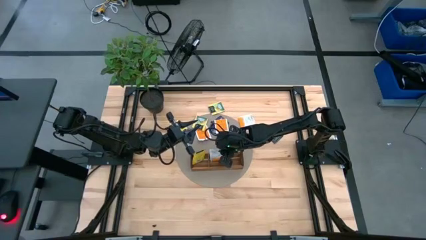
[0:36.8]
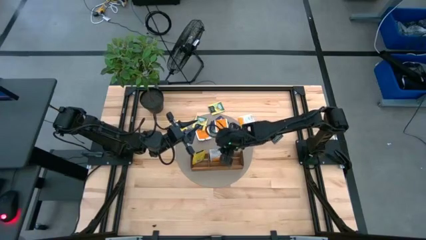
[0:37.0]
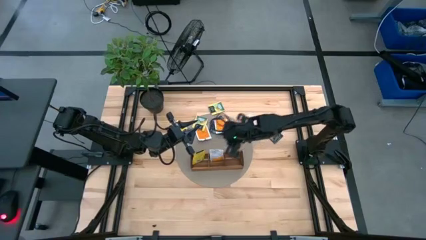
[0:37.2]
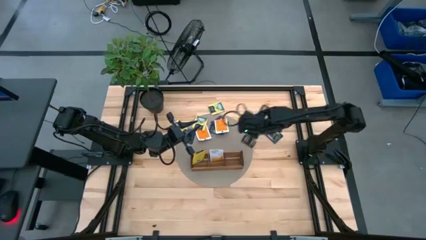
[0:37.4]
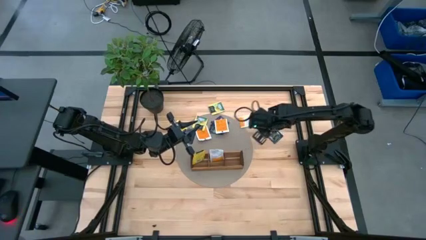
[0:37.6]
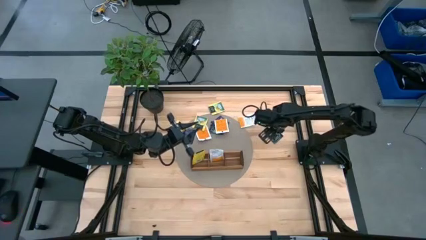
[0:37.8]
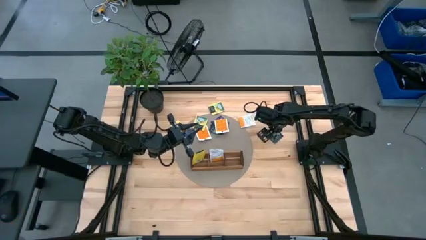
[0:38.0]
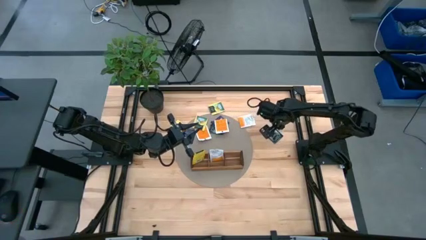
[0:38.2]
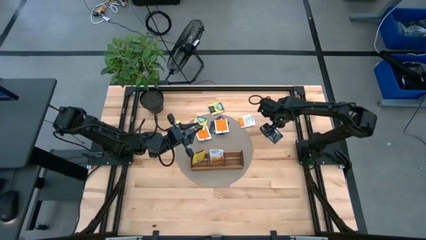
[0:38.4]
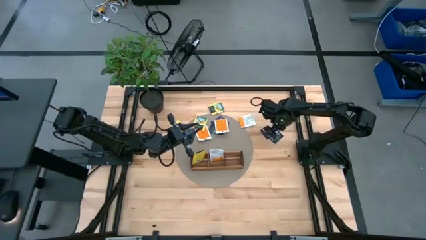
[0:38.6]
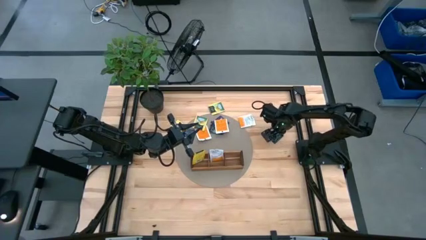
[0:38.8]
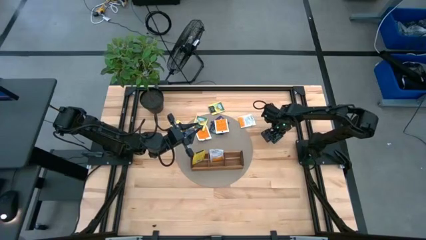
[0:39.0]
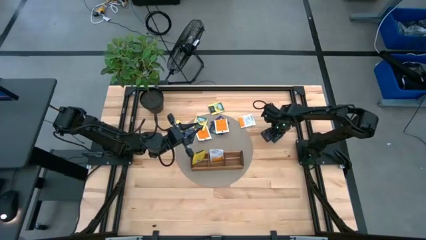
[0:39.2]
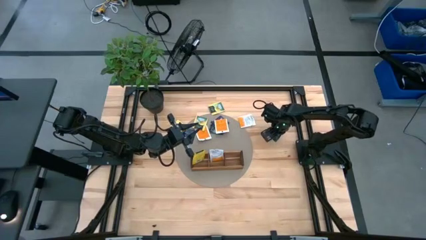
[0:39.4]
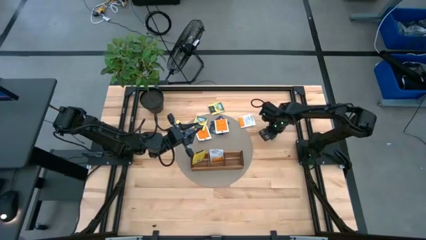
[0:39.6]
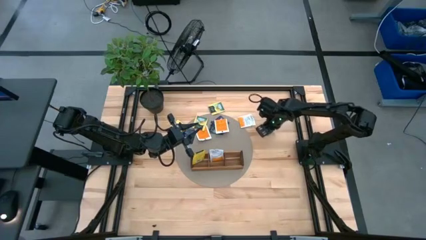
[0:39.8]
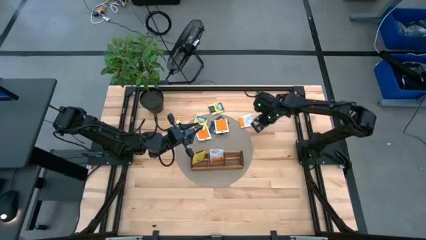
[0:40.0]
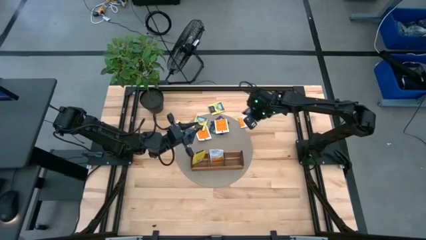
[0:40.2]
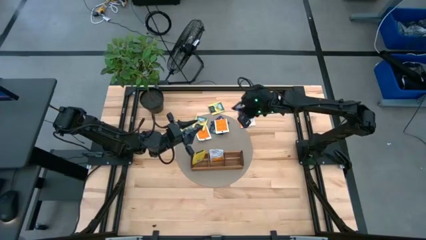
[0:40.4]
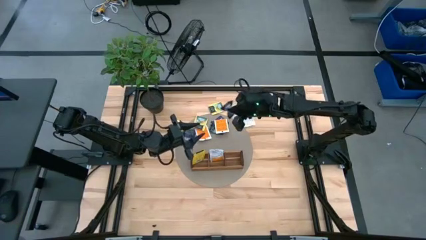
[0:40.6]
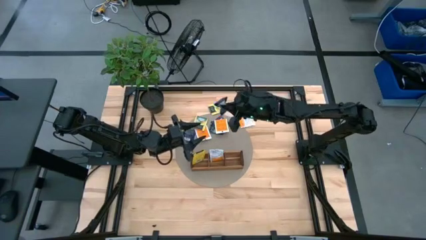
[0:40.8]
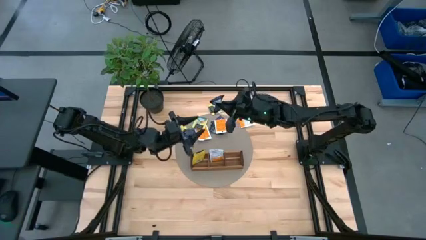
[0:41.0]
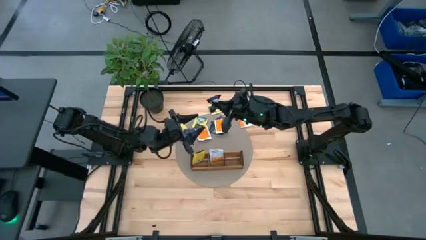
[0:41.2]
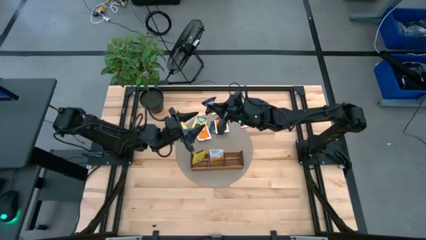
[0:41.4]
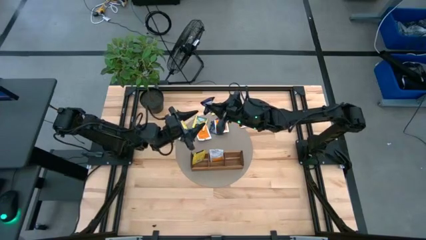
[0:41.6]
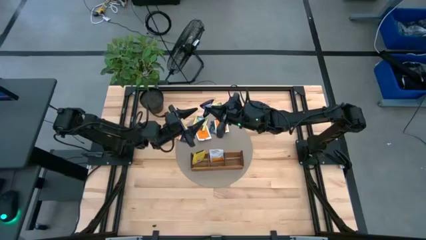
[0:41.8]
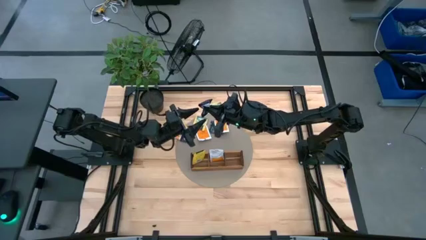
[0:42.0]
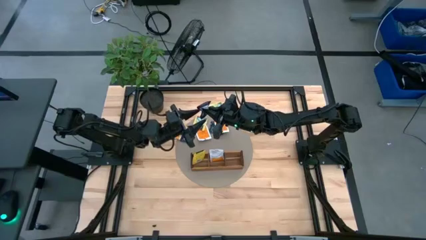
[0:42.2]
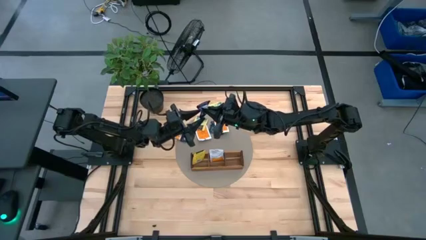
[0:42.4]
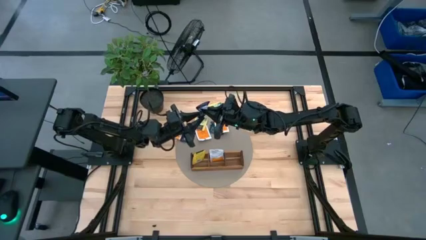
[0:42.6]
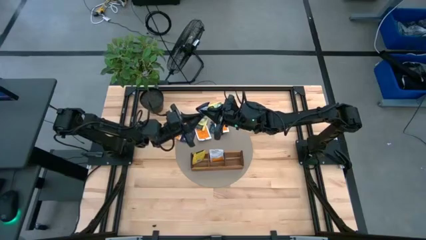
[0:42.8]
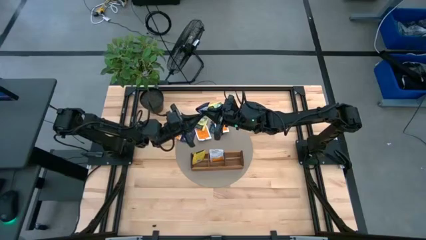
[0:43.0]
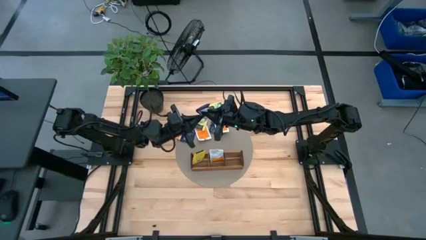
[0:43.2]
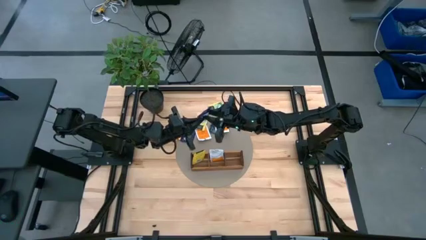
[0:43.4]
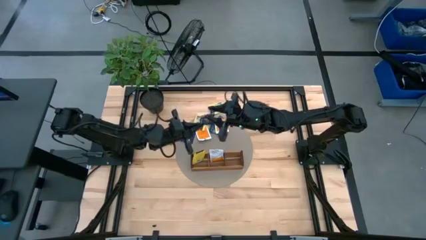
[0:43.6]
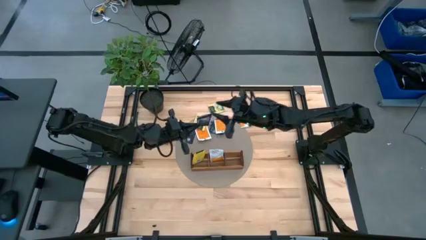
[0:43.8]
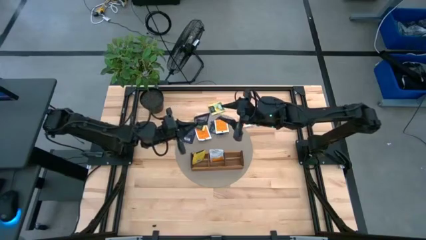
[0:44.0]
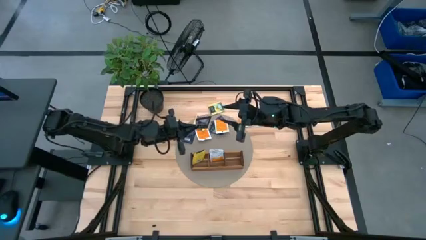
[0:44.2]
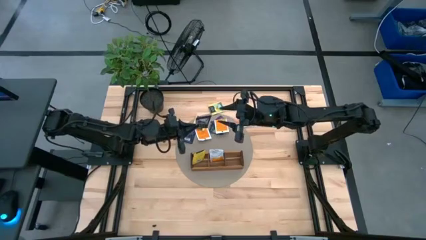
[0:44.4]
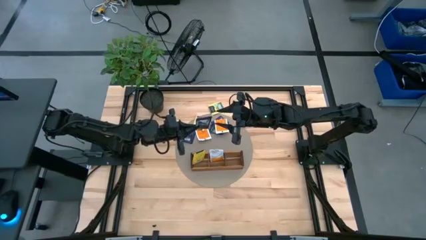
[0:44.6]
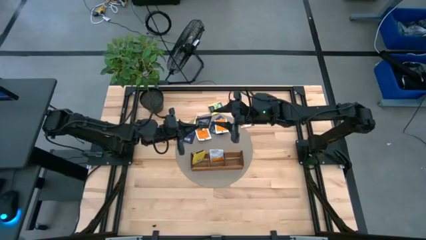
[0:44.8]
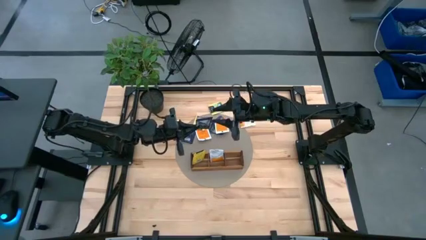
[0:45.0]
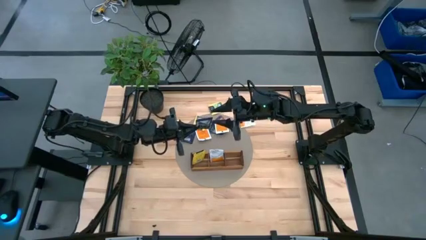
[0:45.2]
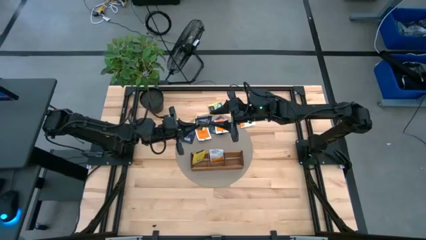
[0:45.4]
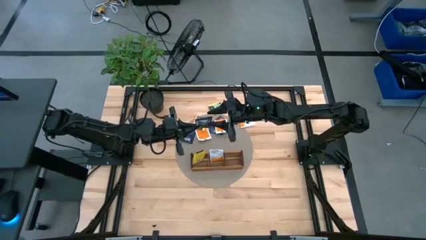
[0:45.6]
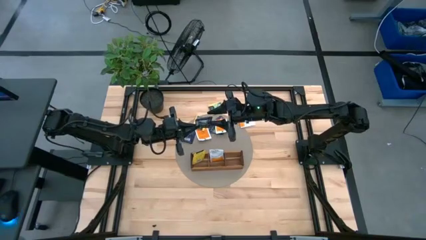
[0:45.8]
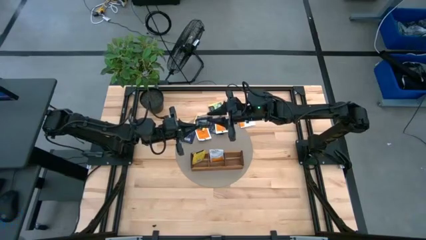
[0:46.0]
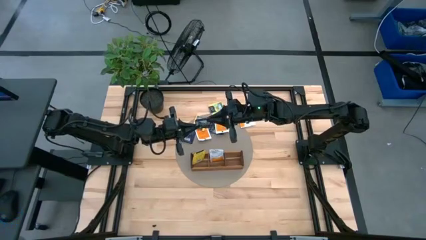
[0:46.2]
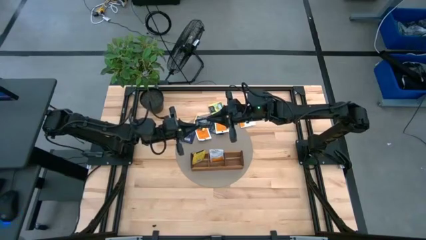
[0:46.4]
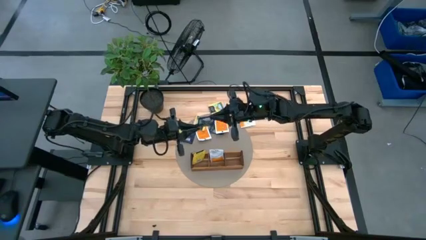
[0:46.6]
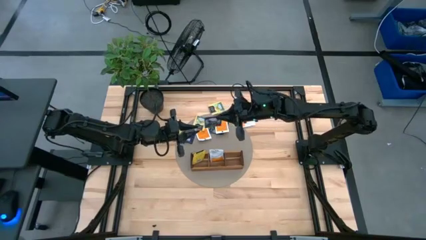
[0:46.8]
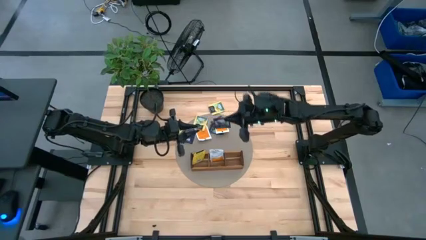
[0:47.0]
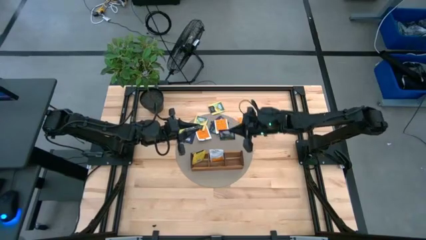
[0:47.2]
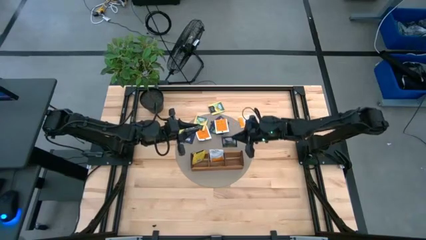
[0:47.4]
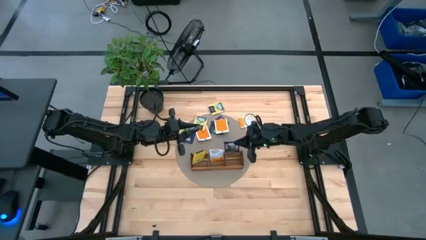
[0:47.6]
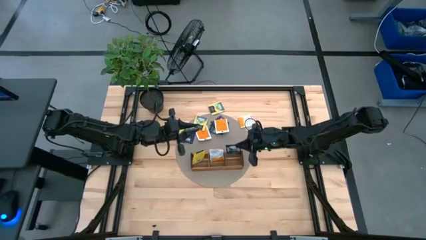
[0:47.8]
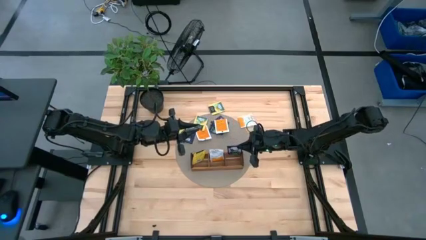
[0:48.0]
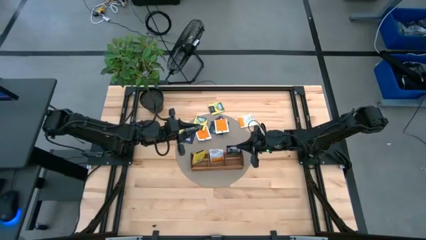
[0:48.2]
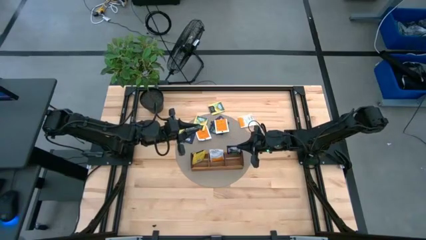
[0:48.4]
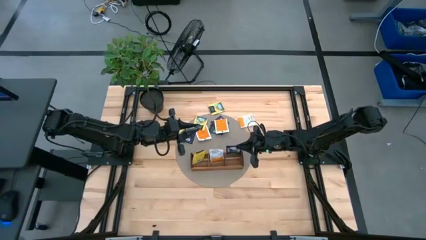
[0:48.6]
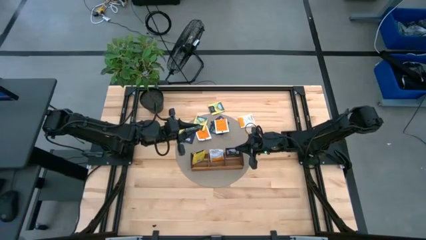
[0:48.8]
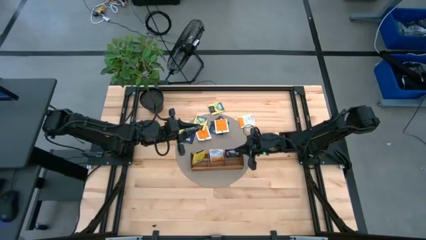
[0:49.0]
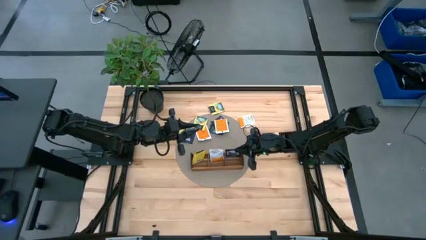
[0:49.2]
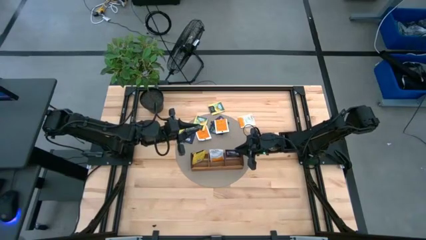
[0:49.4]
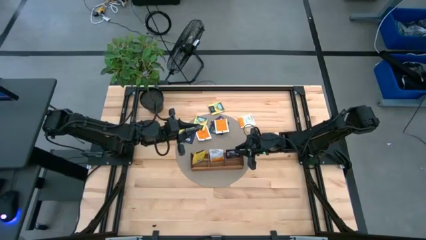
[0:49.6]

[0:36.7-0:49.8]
Task: Pick & Place Tea
Put the violet tea bag into the right section of the wooden organizer
